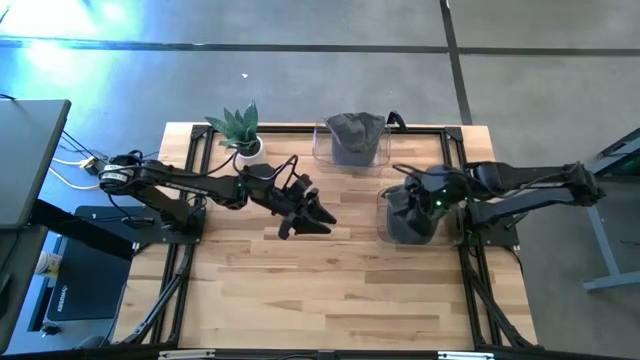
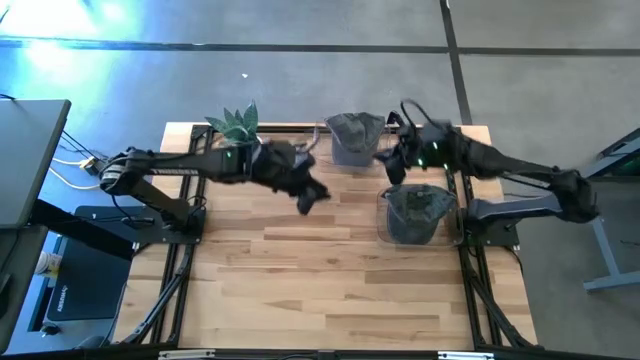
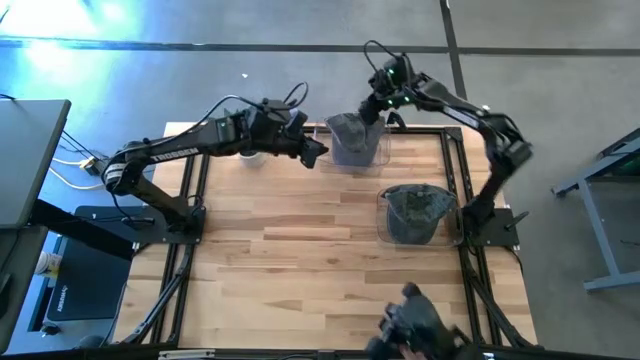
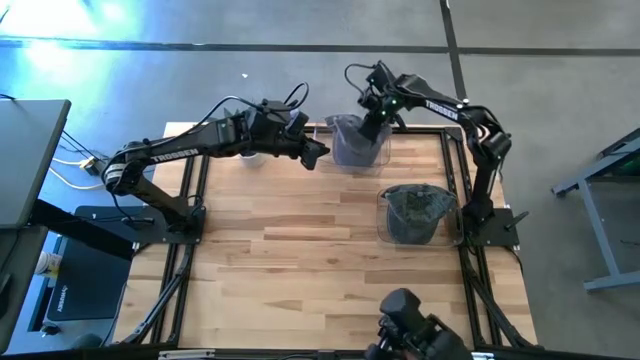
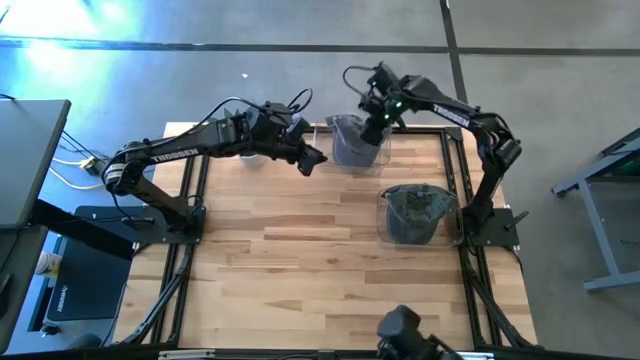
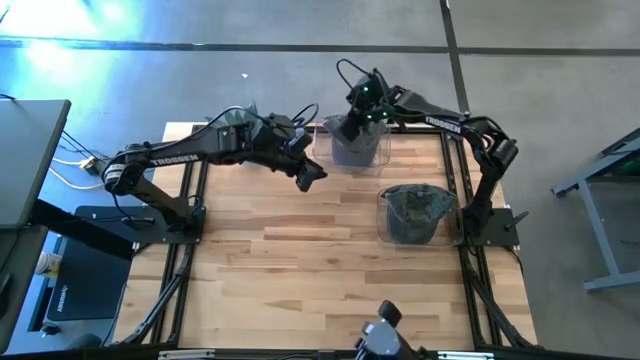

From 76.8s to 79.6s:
Task: Pick & Place hat
Adjust the caps in the top transparent bin

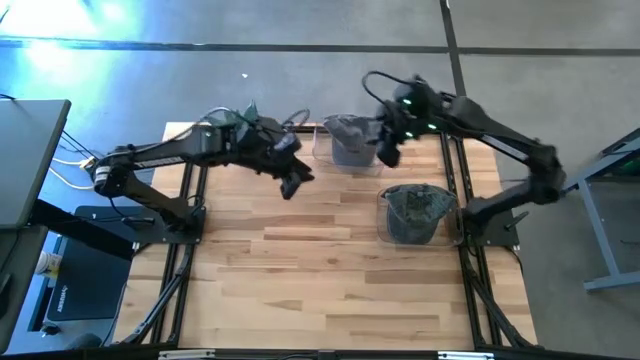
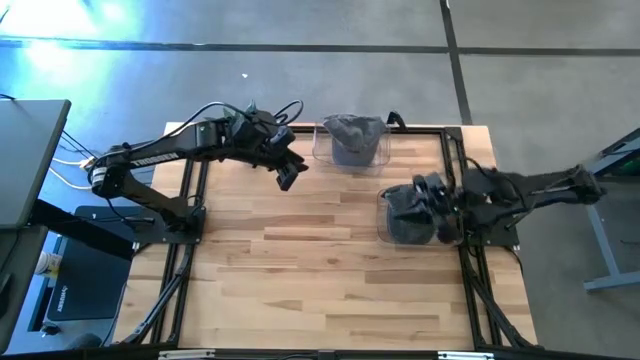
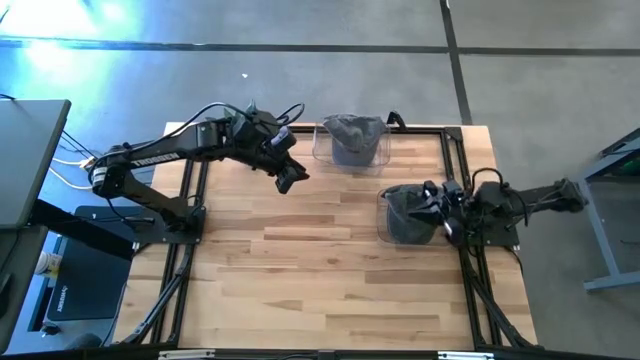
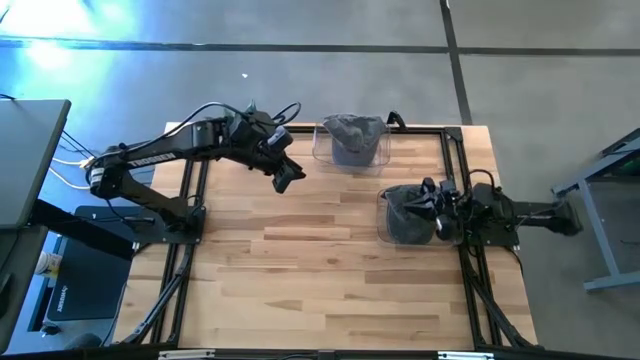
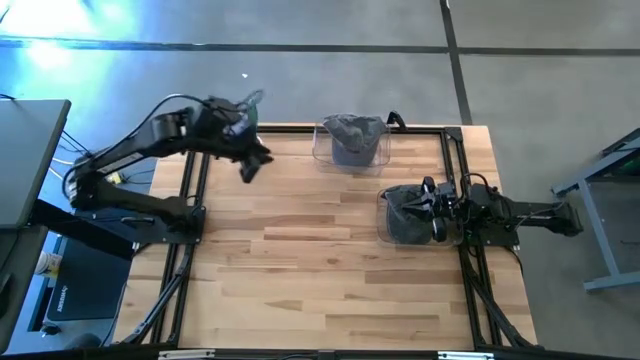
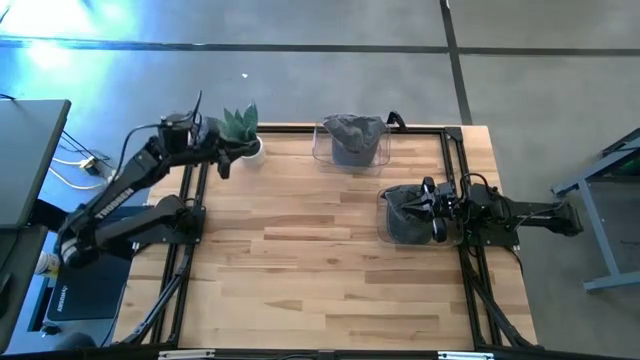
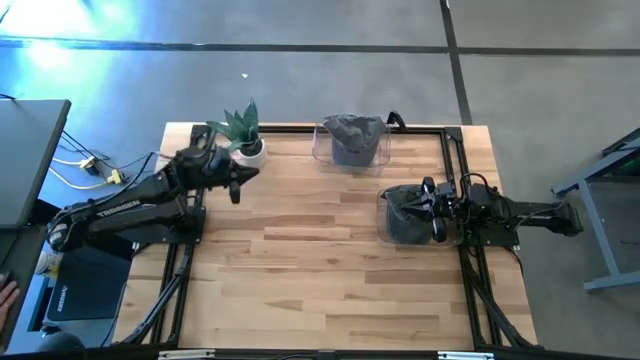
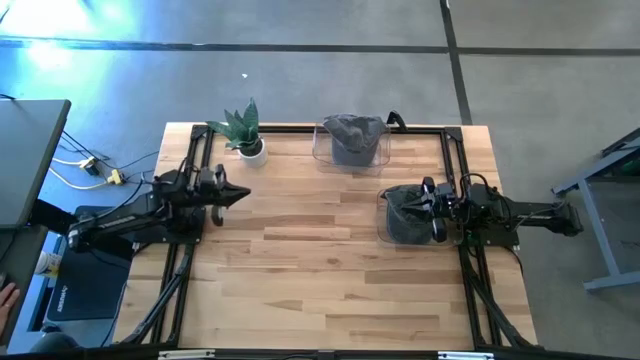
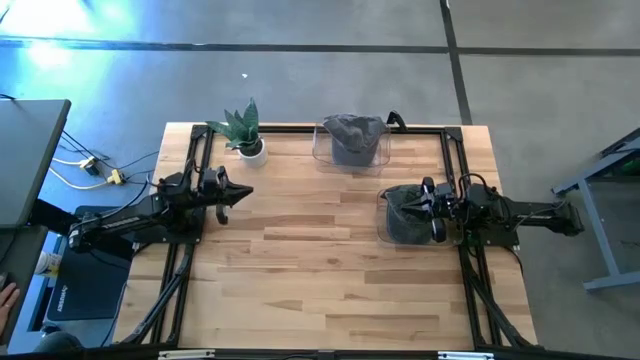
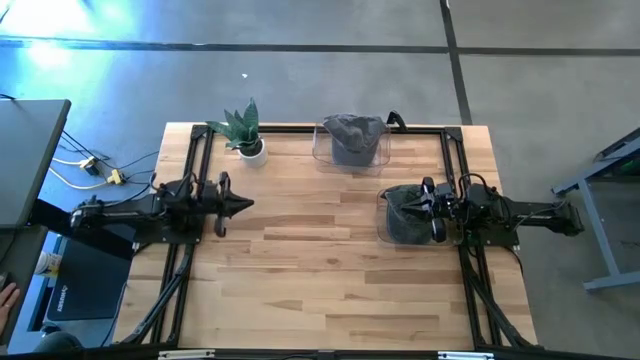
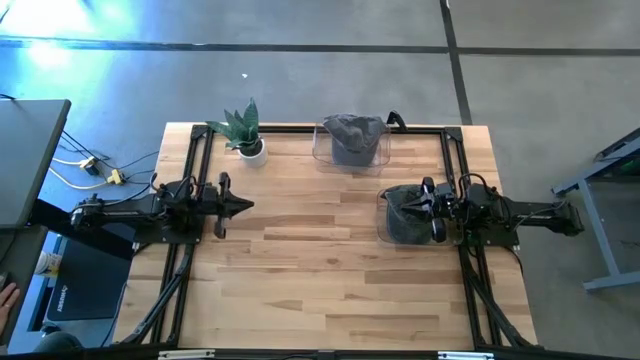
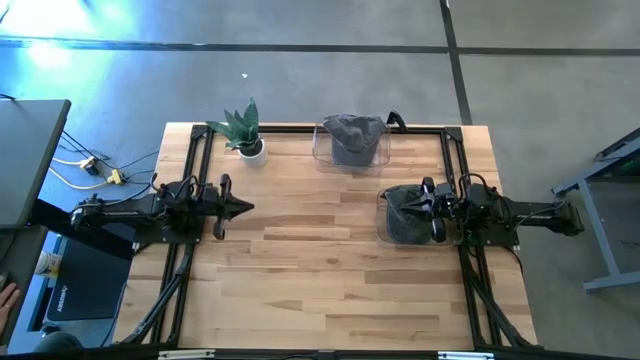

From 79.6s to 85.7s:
Return to Home Position

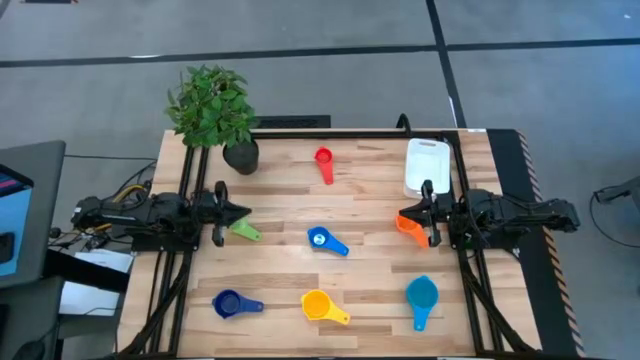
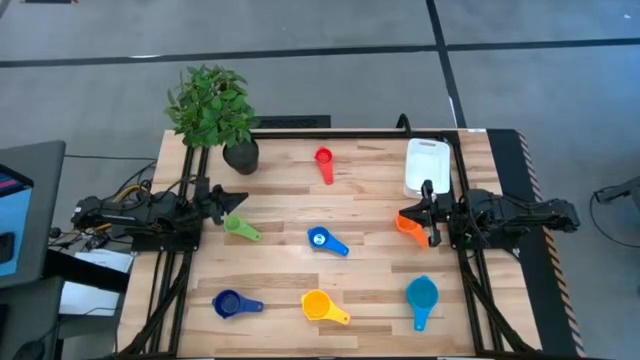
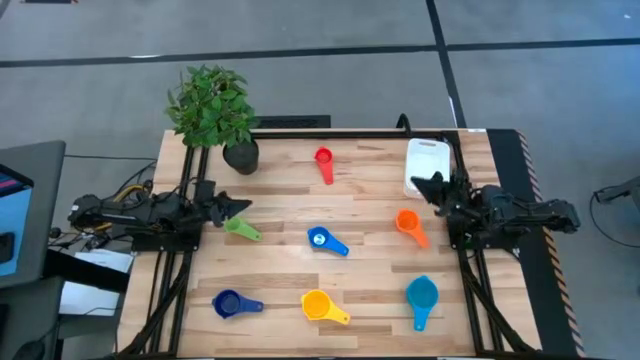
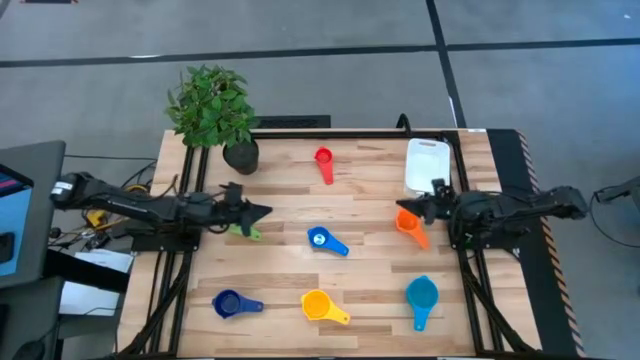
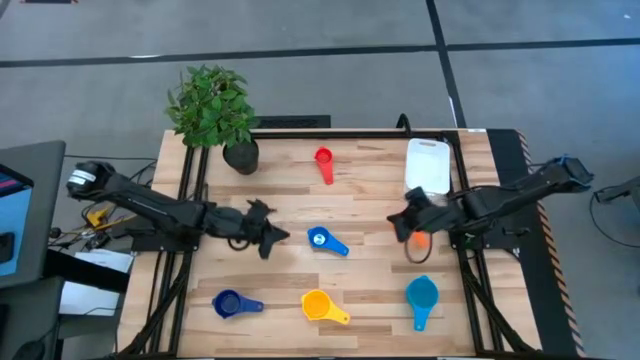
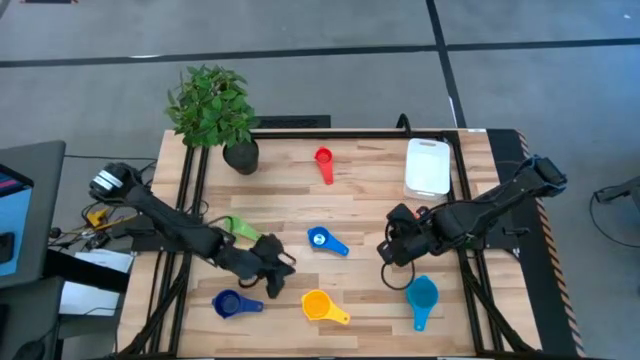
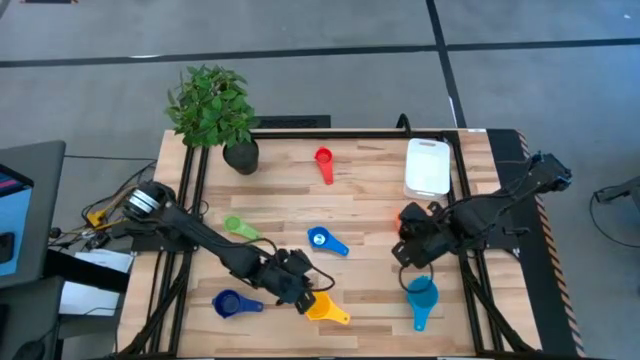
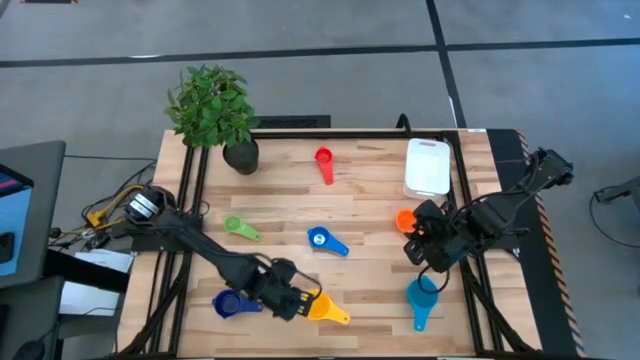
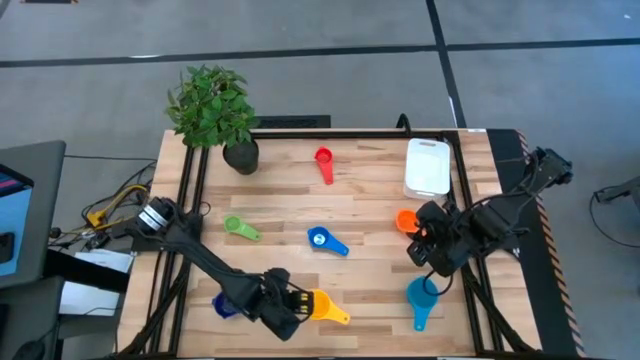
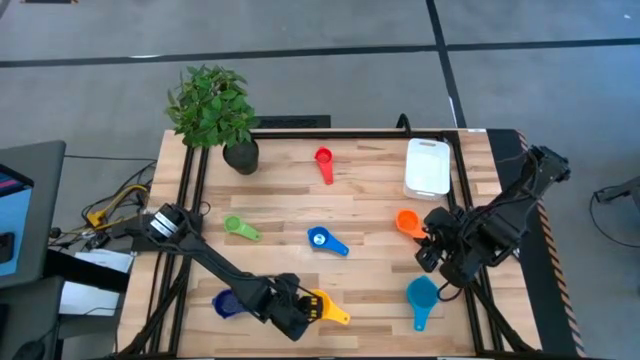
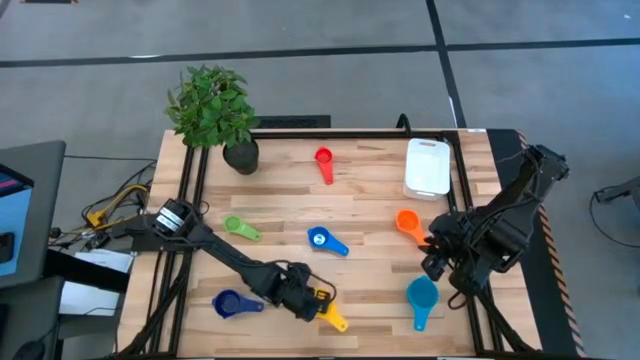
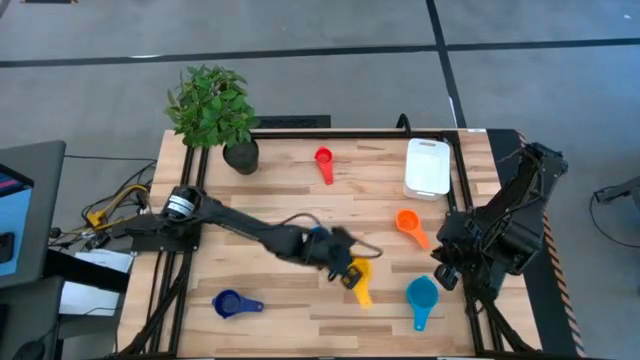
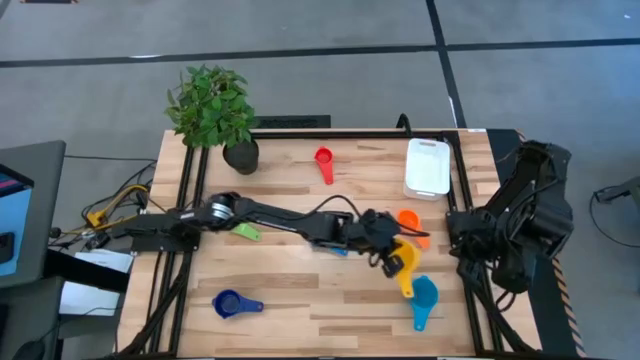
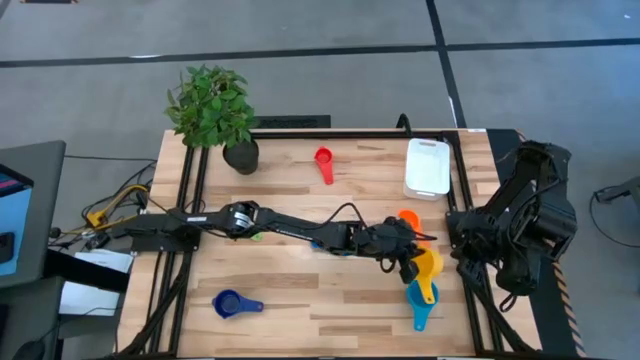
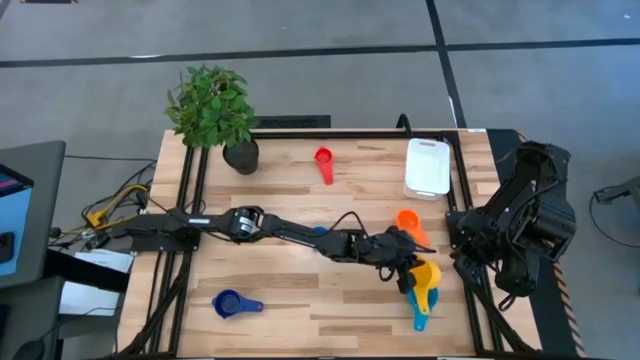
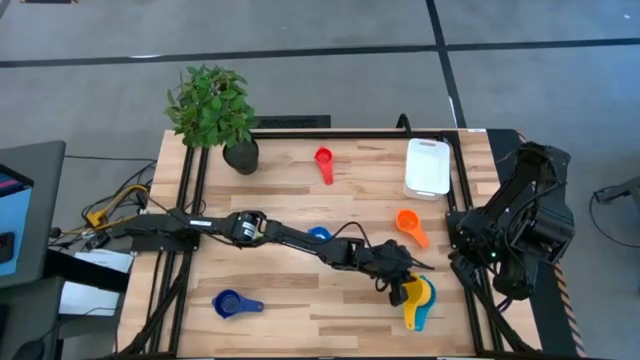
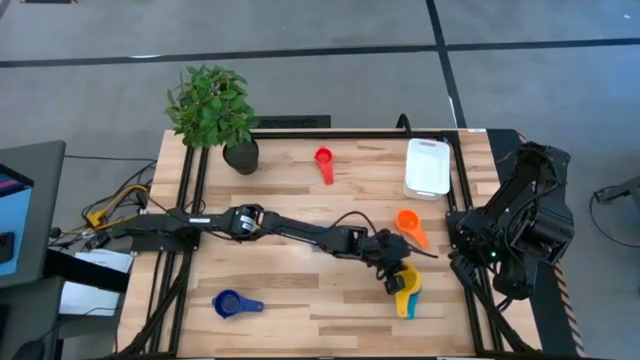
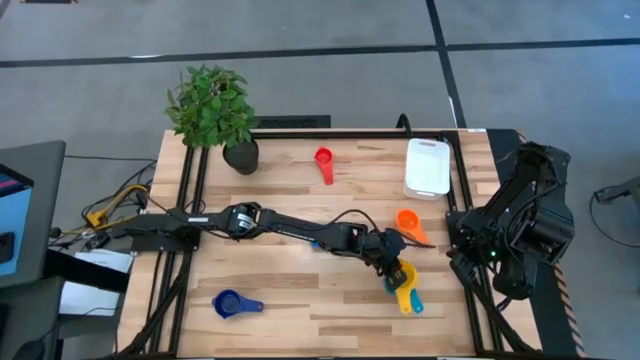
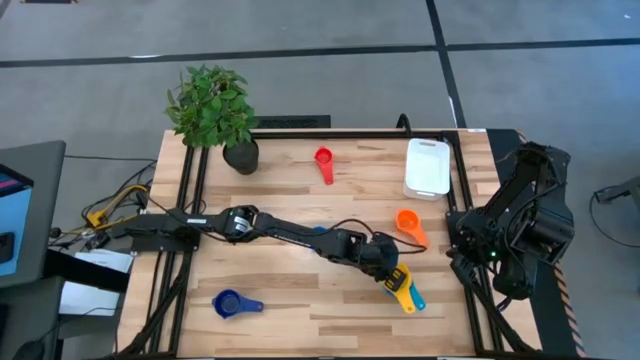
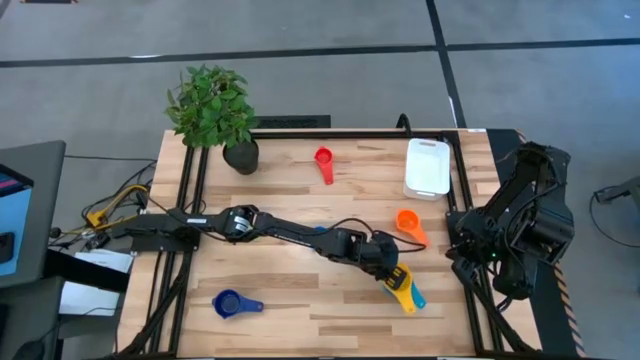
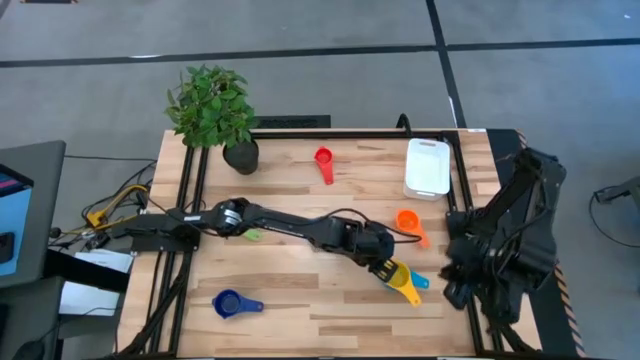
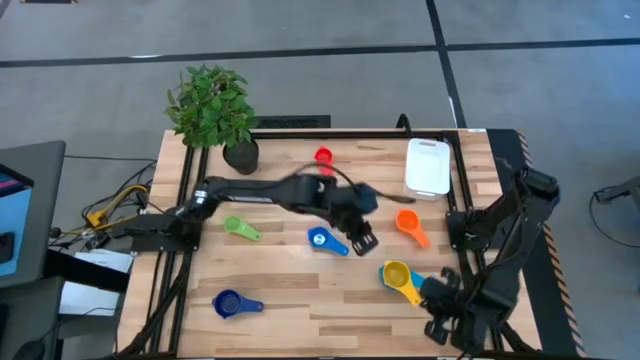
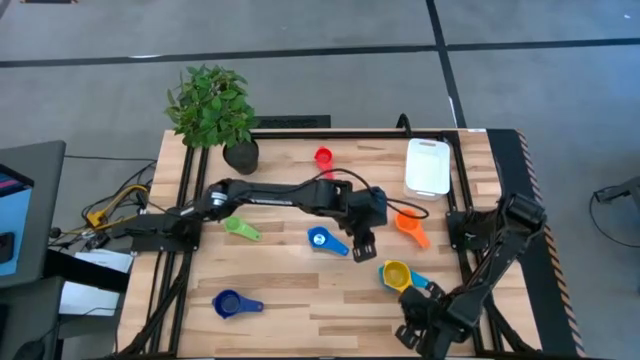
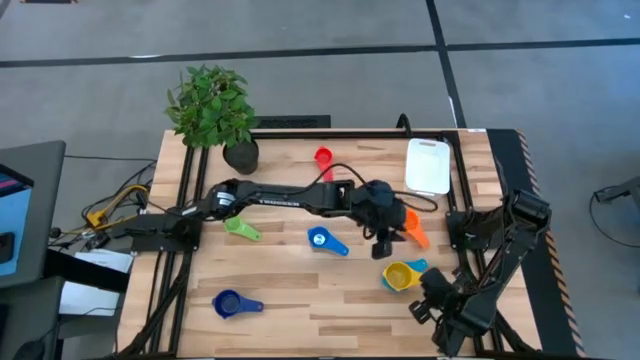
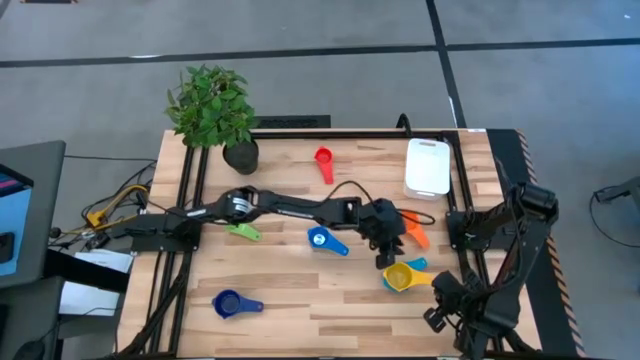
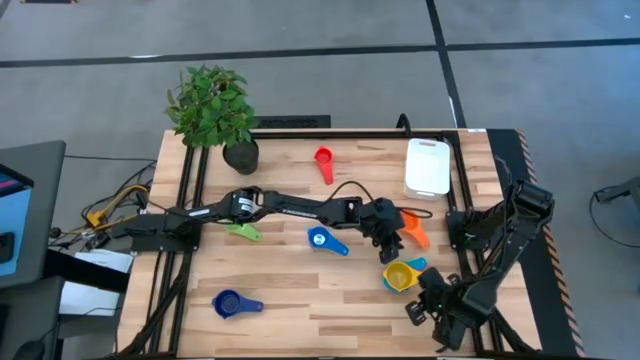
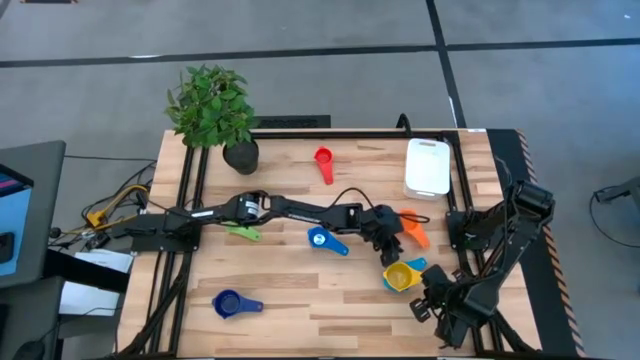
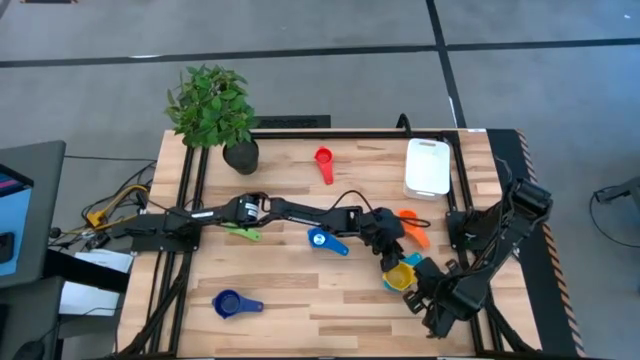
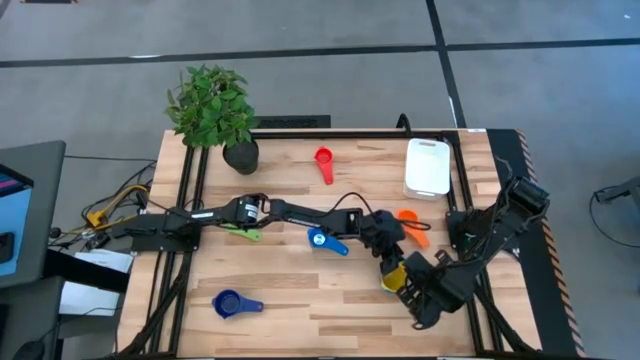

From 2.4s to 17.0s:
Task: Nest measuring cups in basket
Stack the yellow measuring cup on the light blue measuring cup
